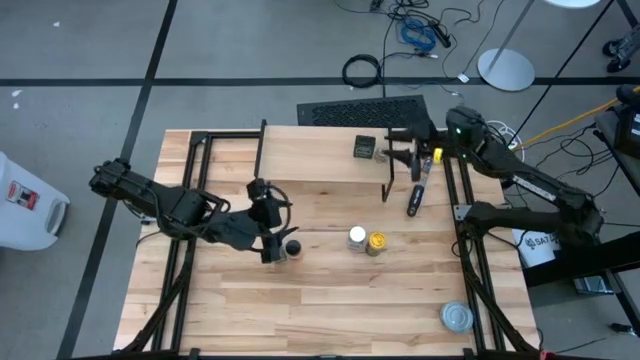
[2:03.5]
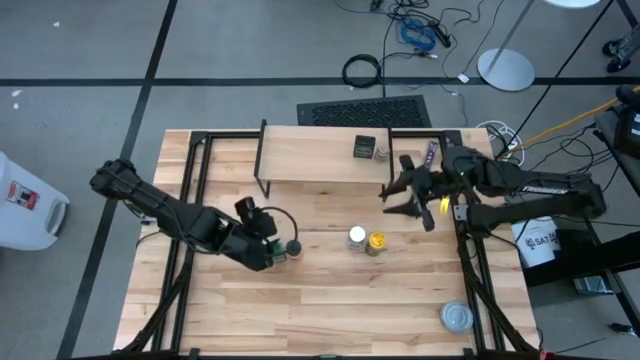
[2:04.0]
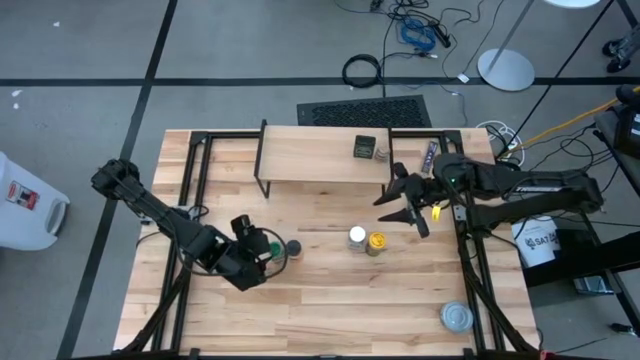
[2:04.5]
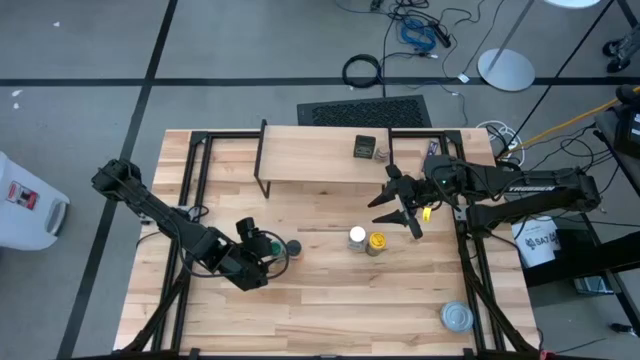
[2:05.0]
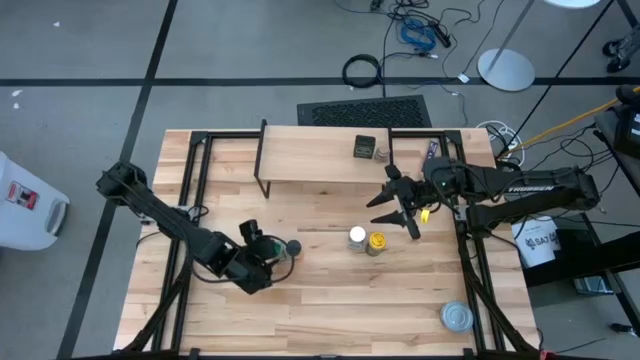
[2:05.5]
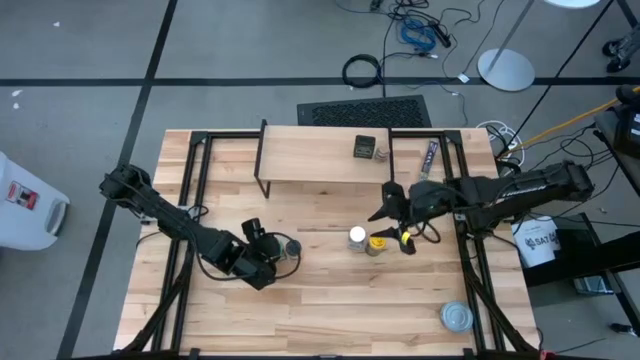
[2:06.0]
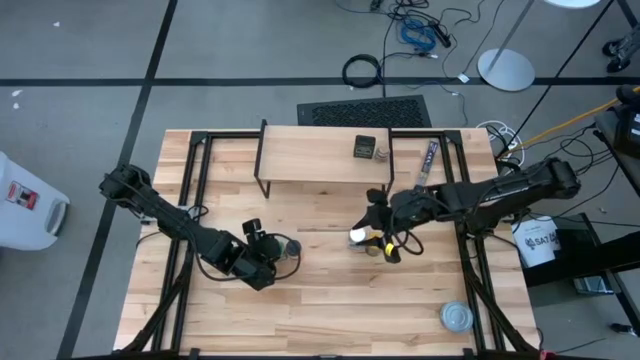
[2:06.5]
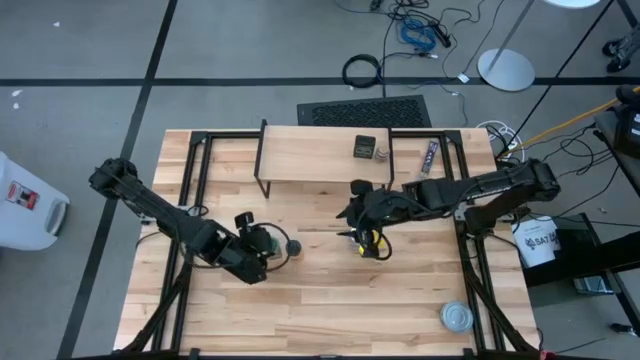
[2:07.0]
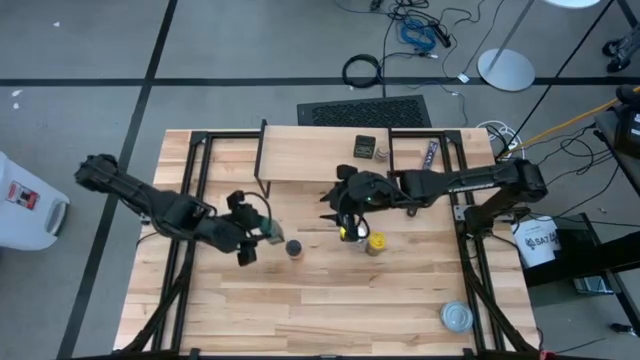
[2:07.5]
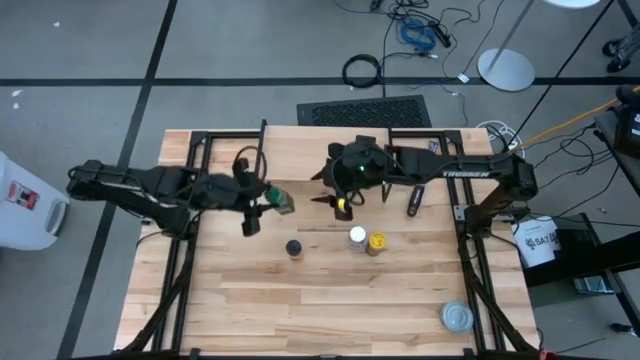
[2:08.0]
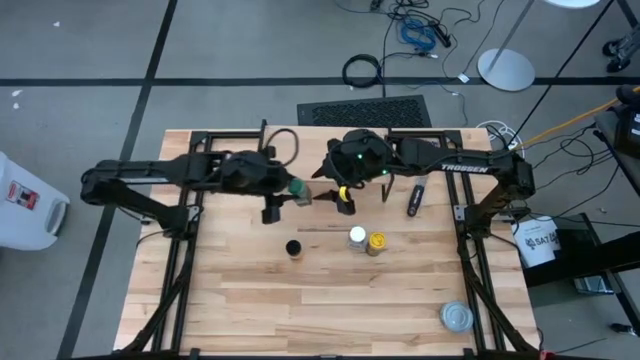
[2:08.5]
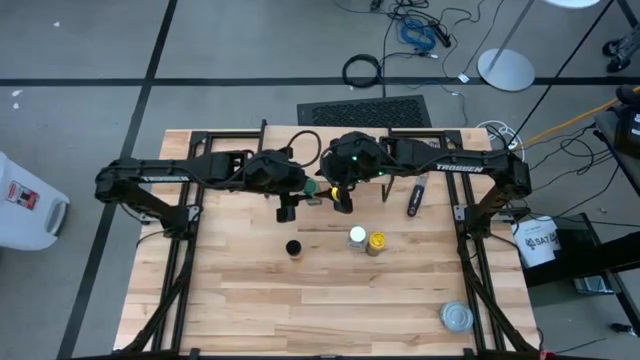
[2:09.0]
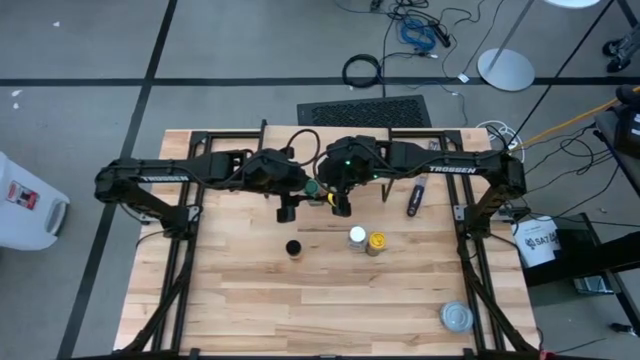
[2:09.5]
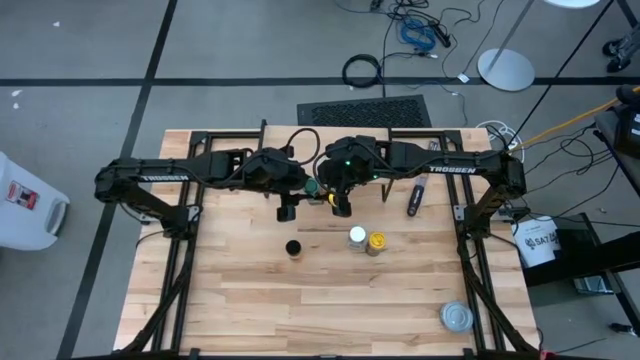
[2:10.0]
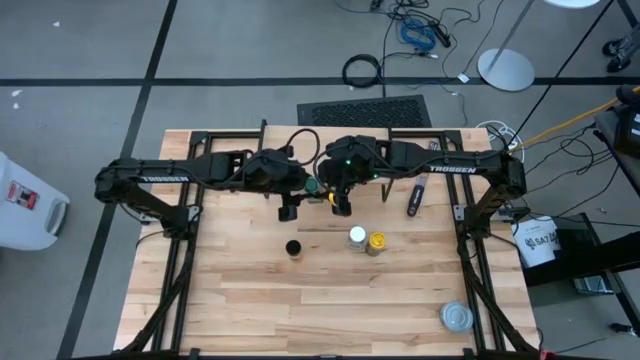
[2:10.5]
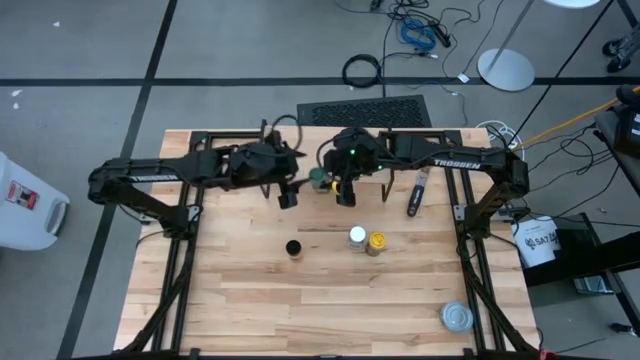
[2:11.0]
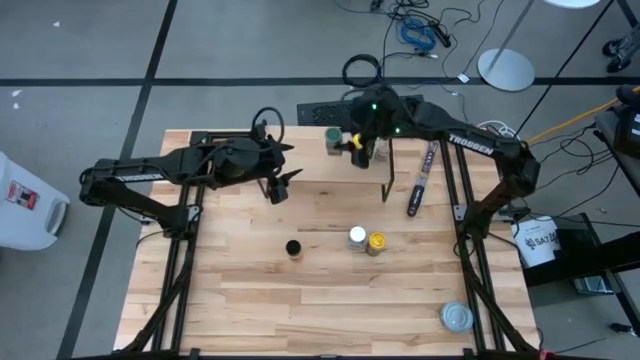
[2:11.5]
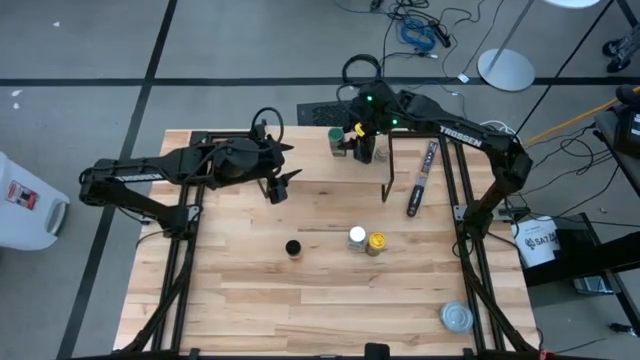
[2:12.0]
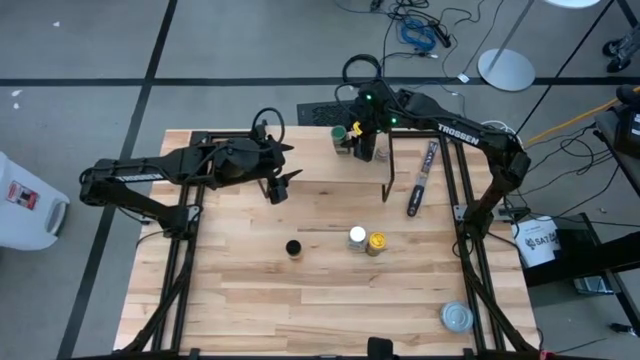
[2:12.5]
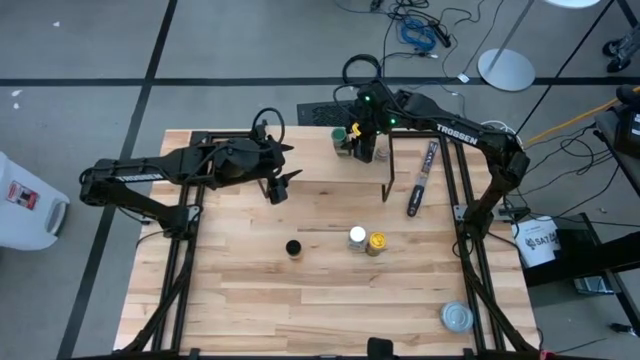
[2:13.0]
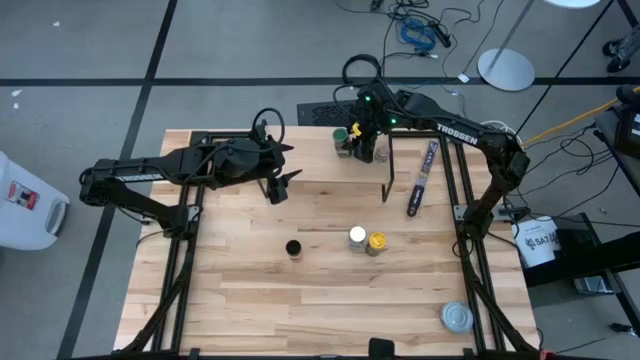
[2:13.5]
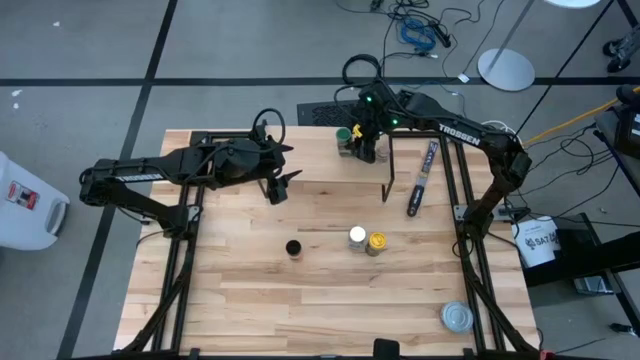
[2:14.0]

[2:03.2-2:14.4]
Task: Shelf spices
Put the green seasoning bottle on the shelf

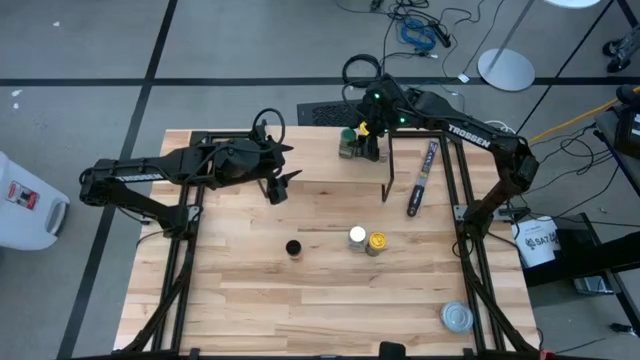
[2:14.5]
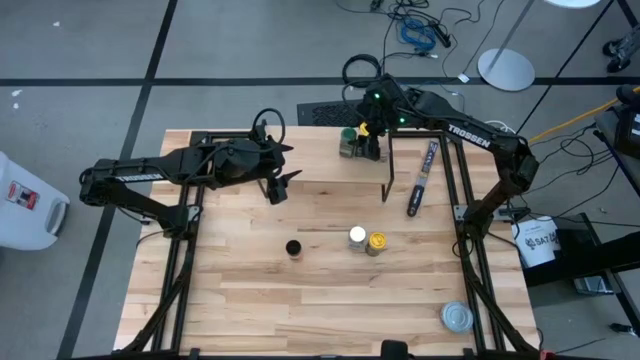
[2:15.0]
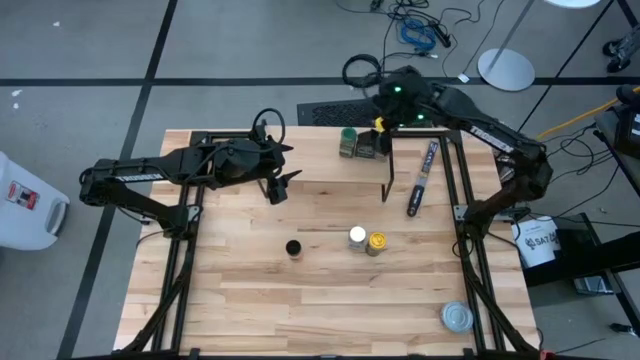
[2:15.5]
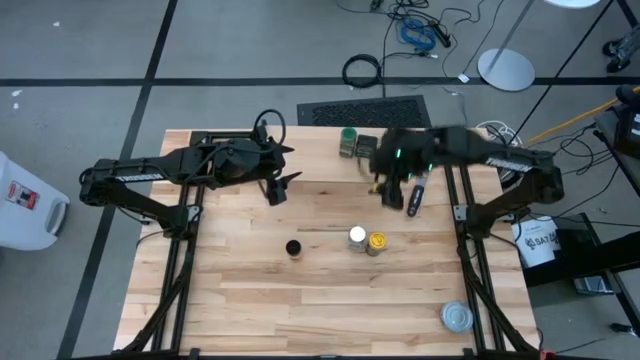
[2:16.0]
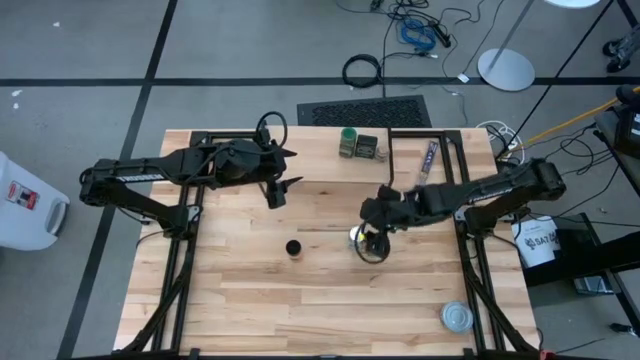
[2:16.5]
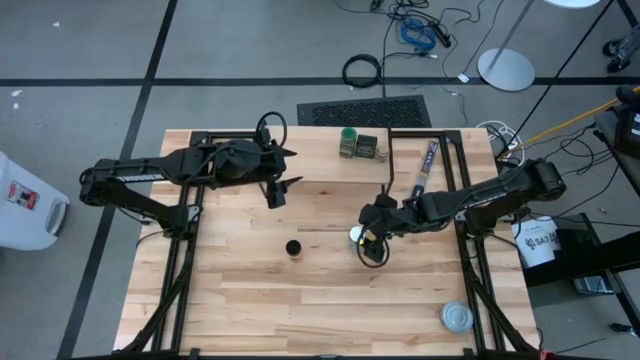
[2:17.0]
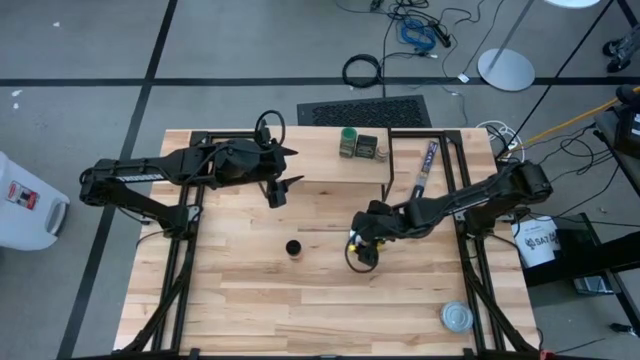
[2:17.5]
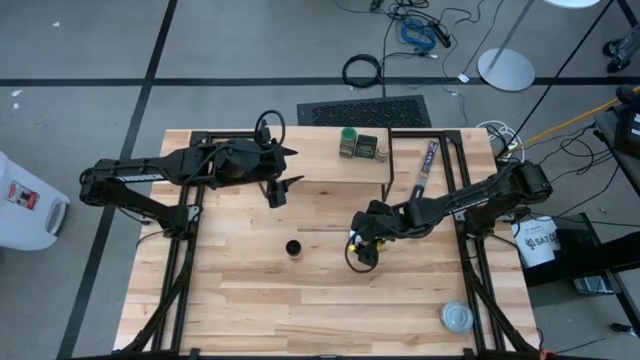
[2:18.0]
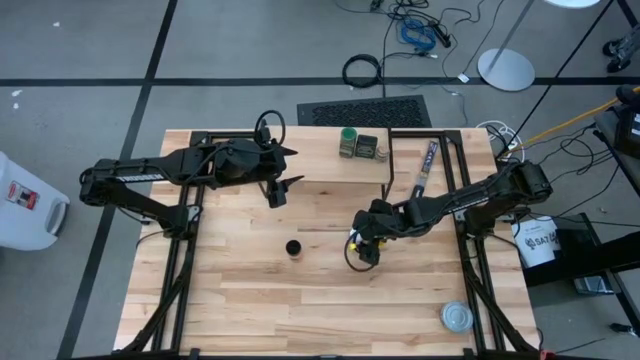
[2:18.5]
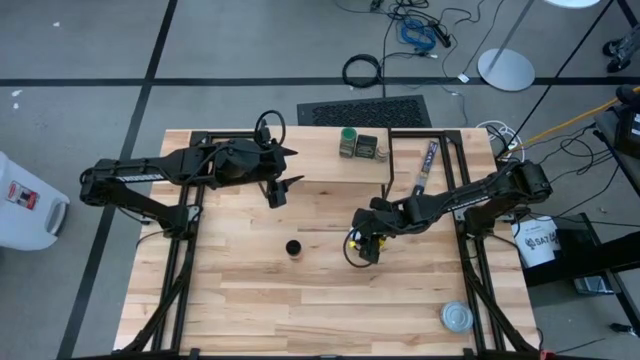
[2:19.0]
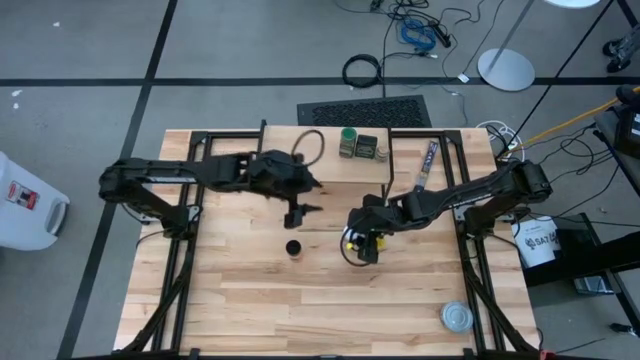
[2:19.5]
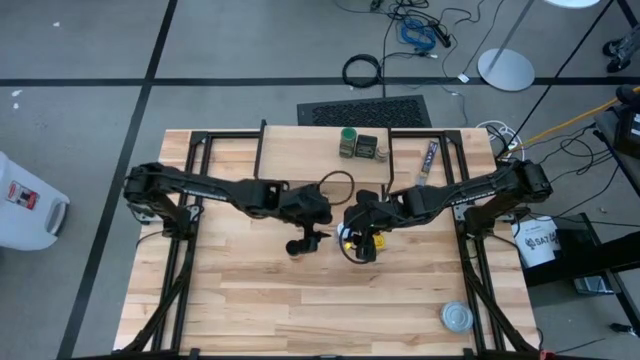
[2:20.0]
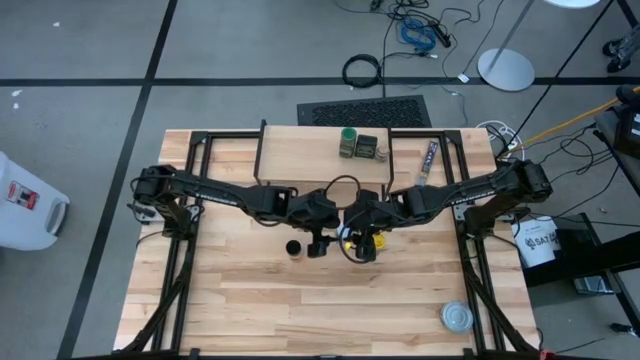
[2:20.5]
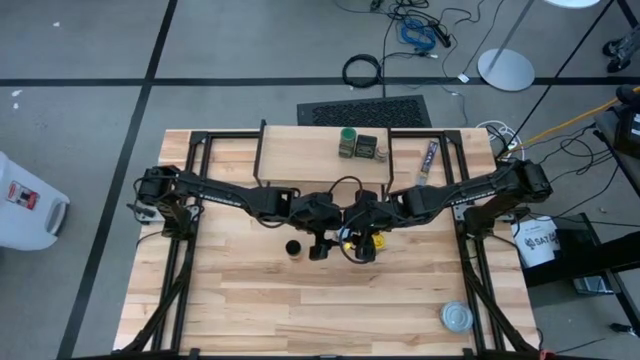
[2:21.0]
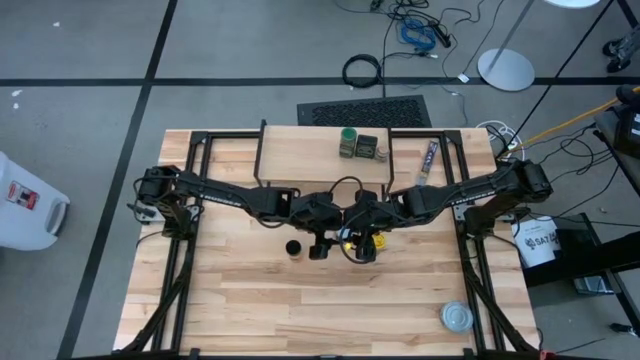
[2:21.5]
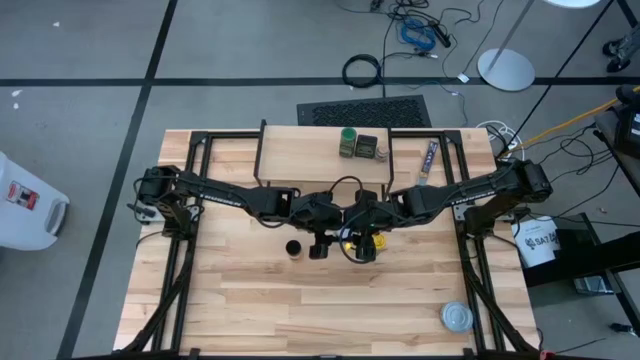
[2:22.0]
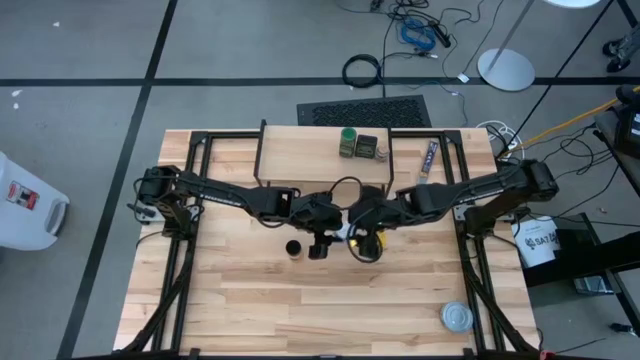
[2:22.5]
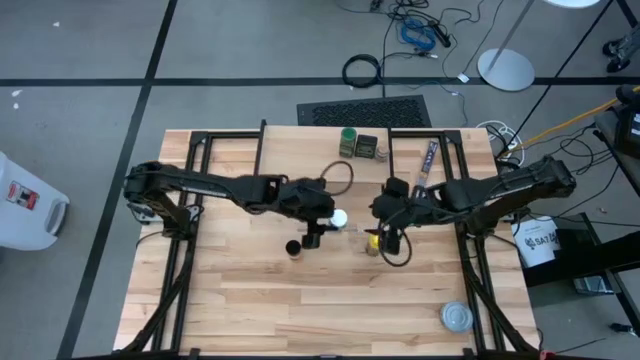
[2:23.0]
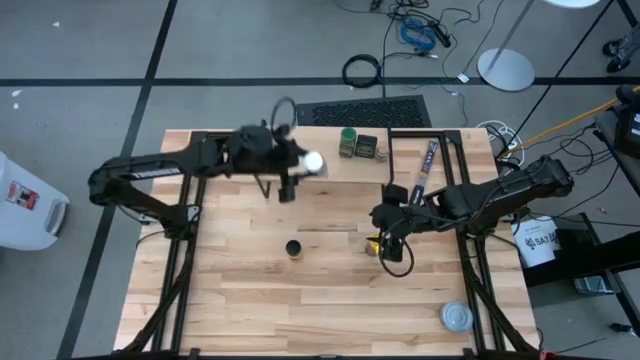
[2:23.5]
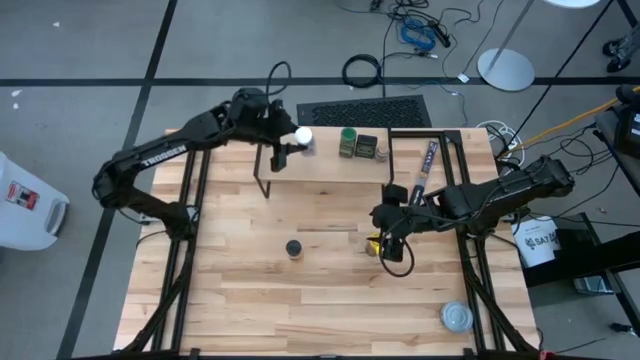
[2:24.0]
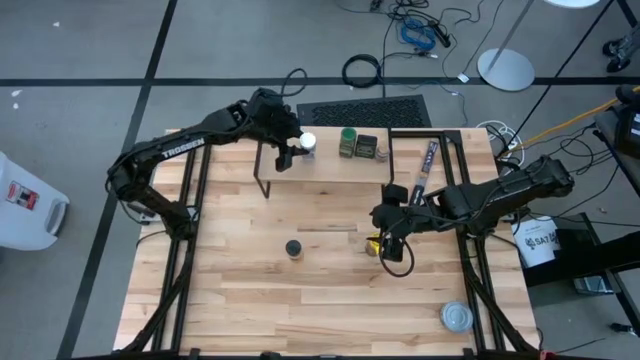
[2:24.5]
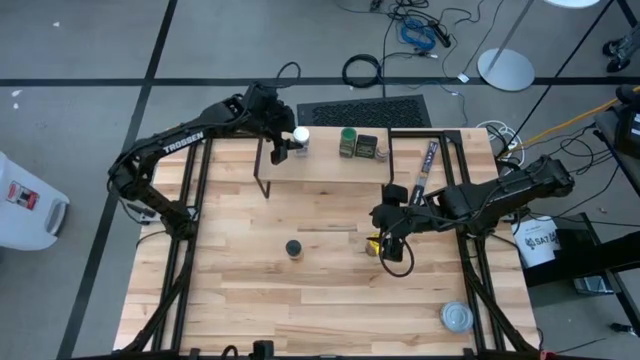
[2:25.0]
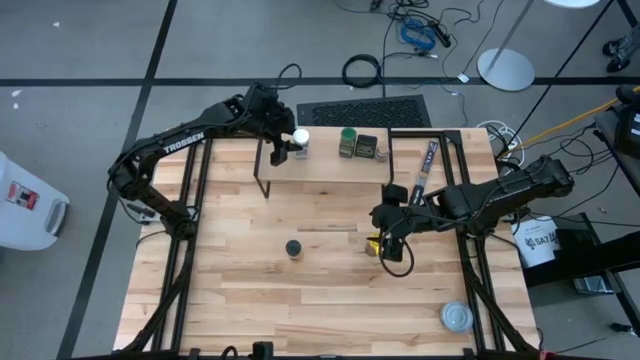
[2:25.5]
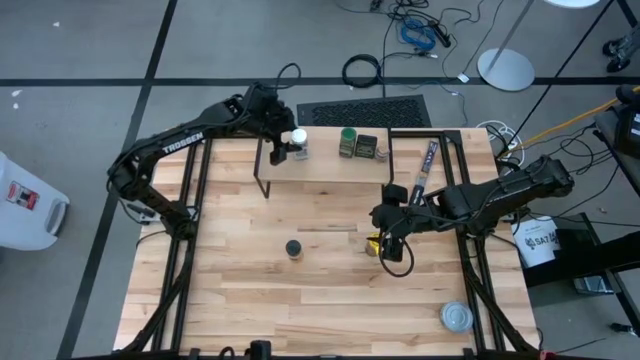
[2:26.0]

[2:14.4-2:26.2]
Put the white seasoning bottle on the shelf
